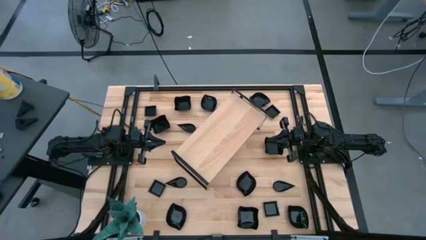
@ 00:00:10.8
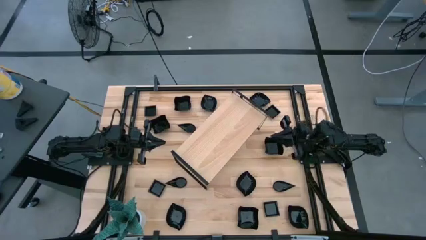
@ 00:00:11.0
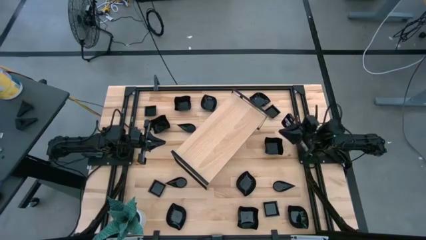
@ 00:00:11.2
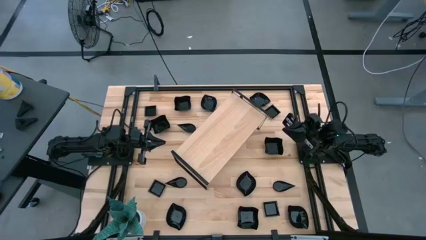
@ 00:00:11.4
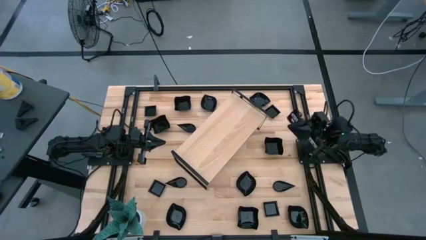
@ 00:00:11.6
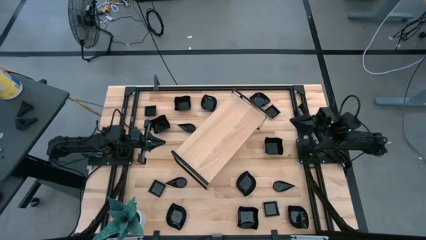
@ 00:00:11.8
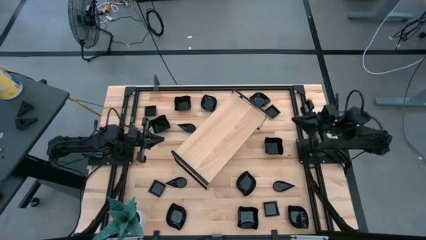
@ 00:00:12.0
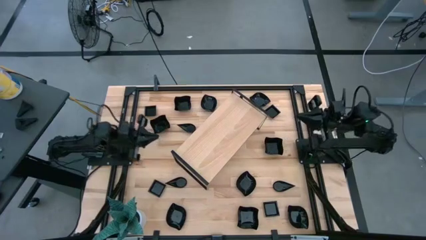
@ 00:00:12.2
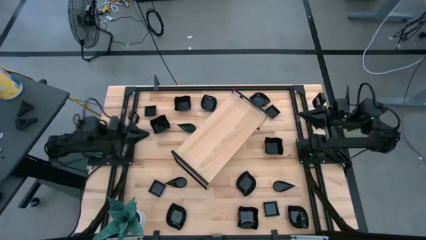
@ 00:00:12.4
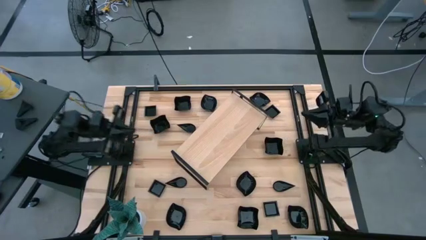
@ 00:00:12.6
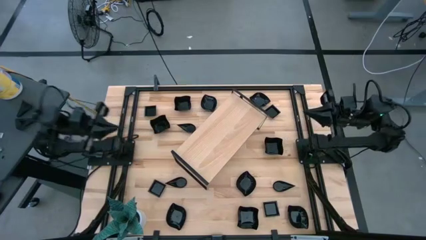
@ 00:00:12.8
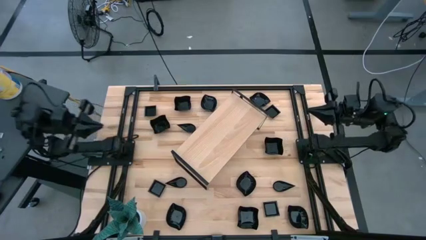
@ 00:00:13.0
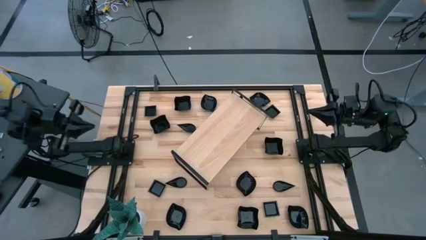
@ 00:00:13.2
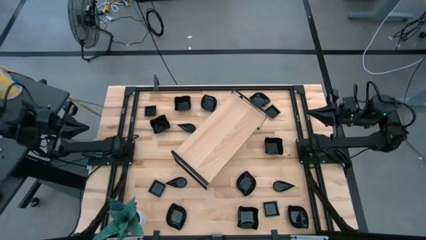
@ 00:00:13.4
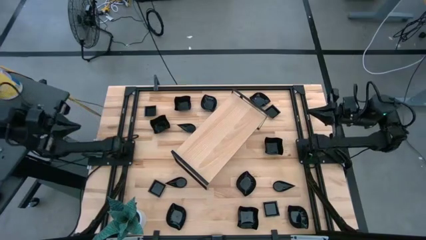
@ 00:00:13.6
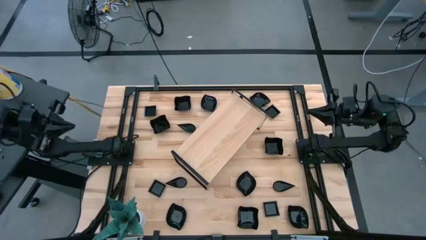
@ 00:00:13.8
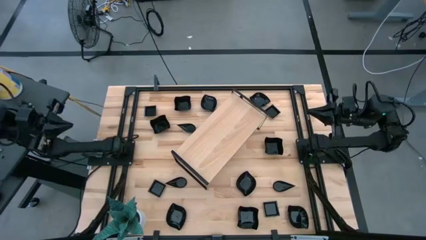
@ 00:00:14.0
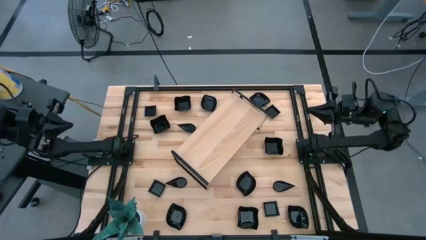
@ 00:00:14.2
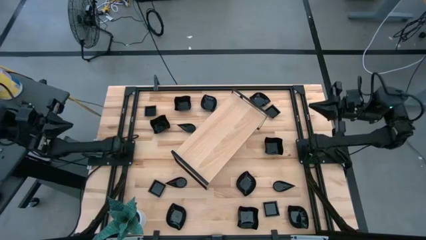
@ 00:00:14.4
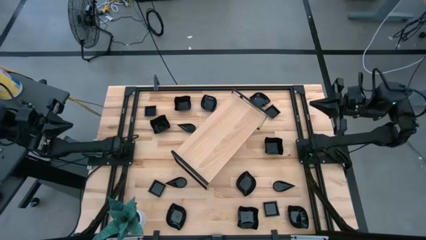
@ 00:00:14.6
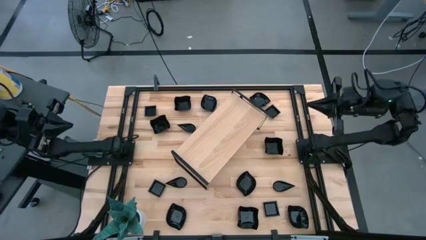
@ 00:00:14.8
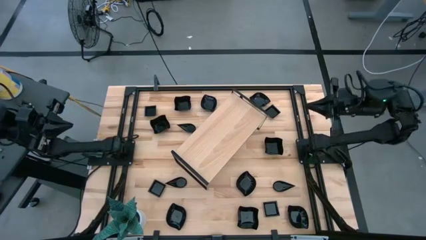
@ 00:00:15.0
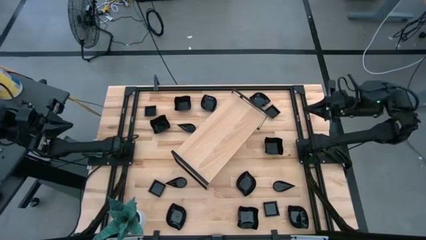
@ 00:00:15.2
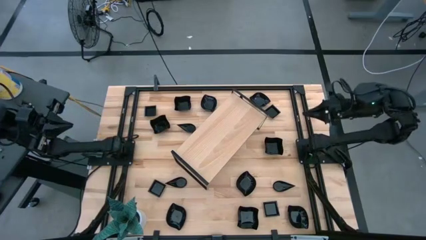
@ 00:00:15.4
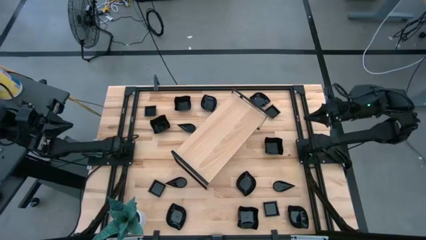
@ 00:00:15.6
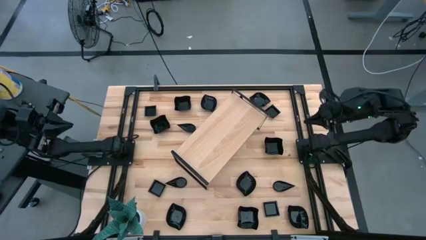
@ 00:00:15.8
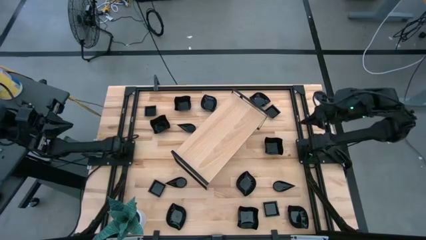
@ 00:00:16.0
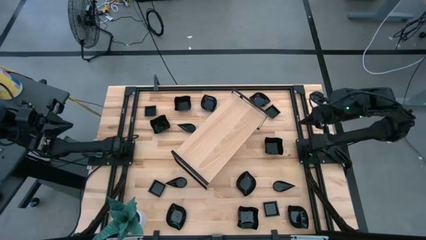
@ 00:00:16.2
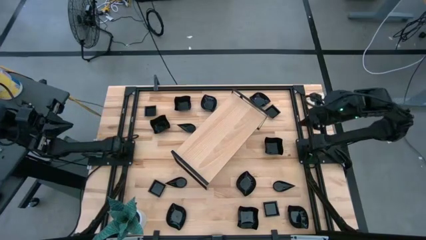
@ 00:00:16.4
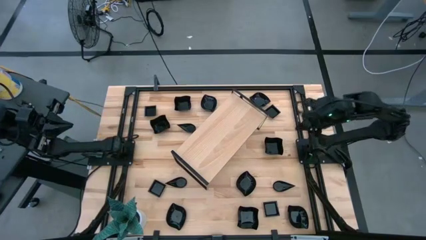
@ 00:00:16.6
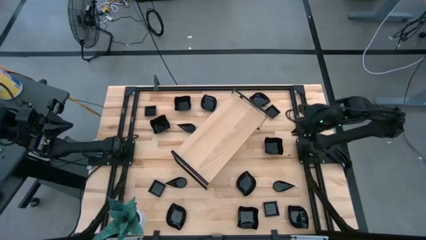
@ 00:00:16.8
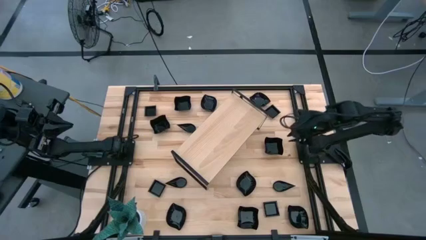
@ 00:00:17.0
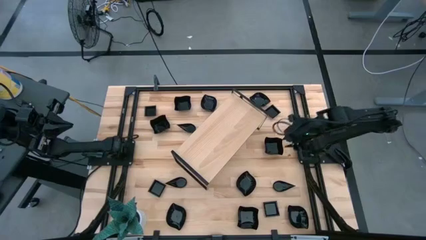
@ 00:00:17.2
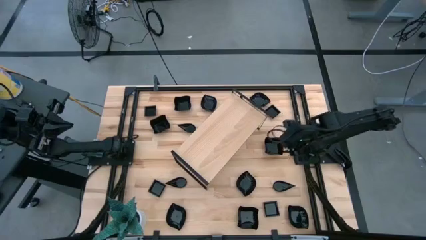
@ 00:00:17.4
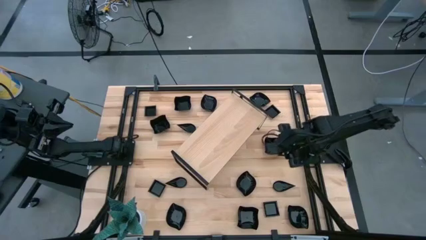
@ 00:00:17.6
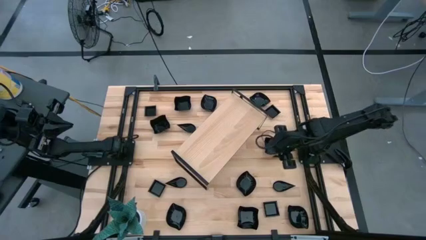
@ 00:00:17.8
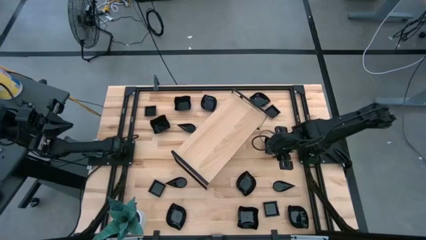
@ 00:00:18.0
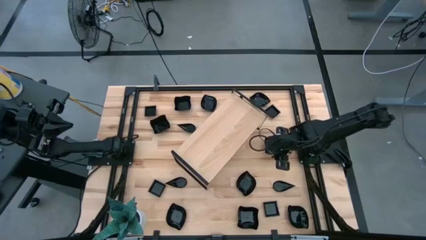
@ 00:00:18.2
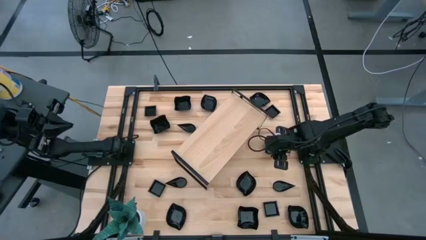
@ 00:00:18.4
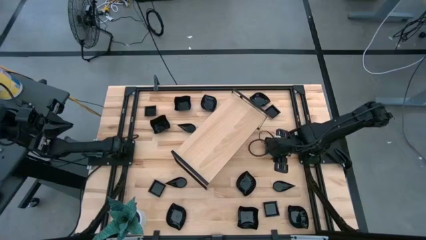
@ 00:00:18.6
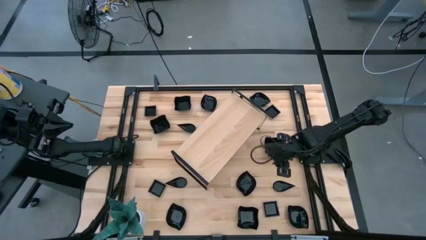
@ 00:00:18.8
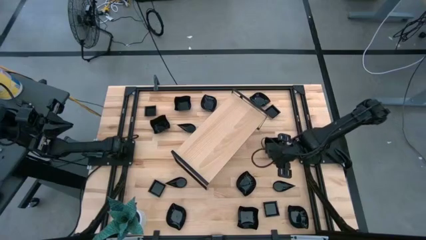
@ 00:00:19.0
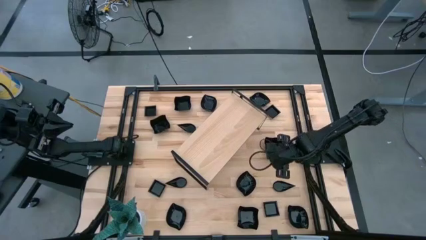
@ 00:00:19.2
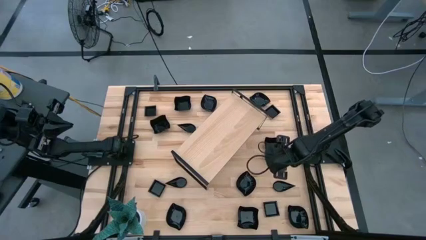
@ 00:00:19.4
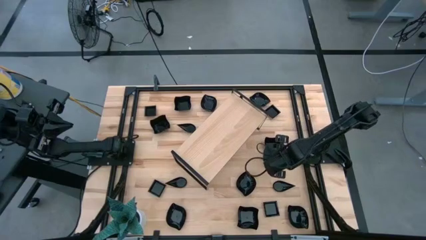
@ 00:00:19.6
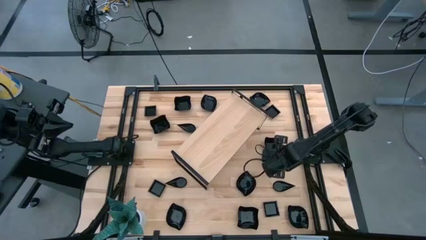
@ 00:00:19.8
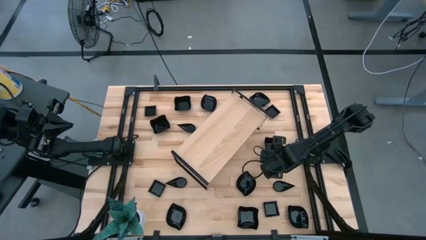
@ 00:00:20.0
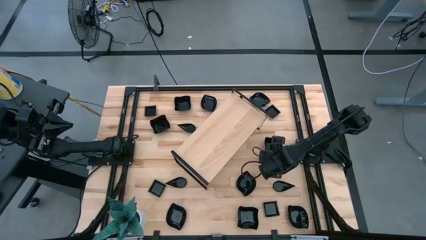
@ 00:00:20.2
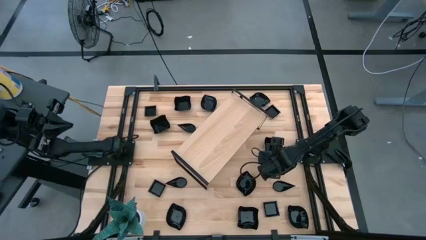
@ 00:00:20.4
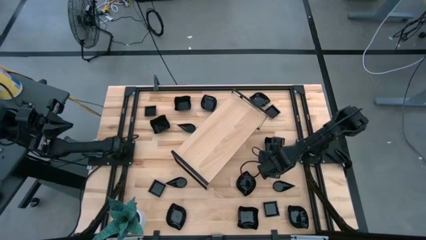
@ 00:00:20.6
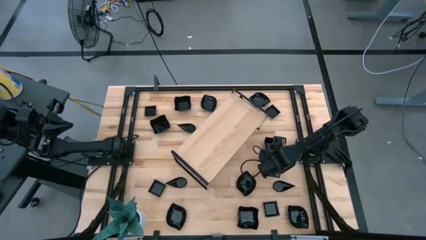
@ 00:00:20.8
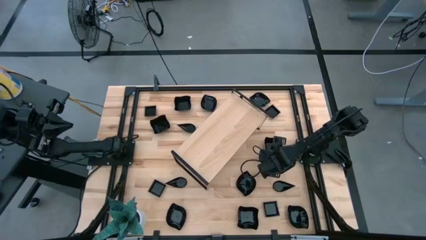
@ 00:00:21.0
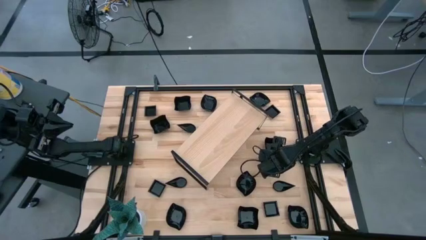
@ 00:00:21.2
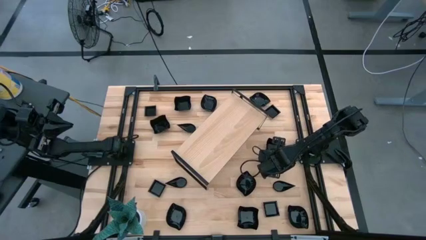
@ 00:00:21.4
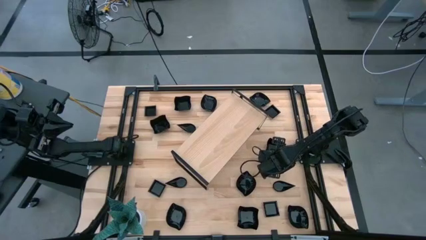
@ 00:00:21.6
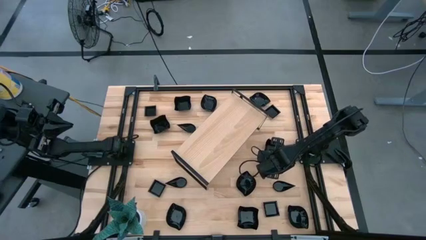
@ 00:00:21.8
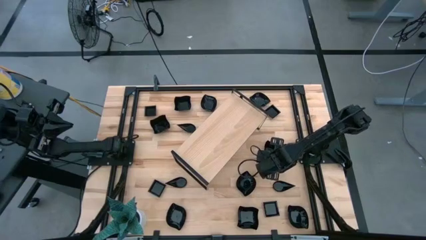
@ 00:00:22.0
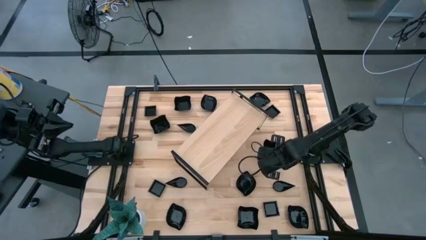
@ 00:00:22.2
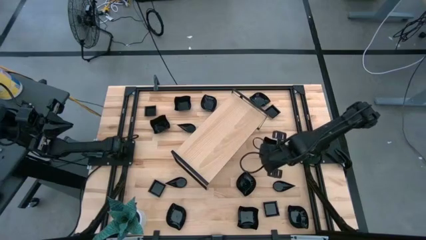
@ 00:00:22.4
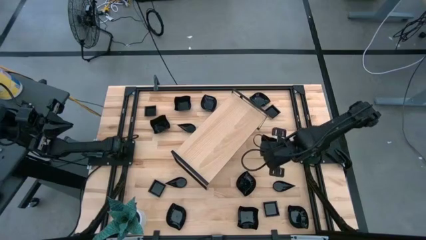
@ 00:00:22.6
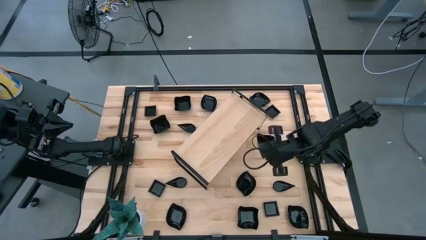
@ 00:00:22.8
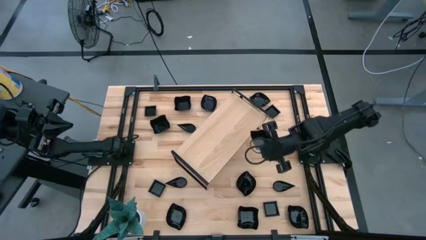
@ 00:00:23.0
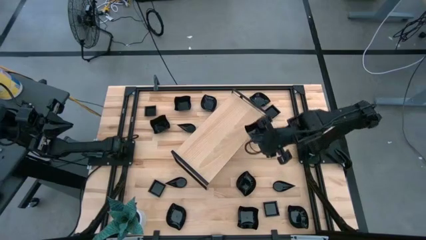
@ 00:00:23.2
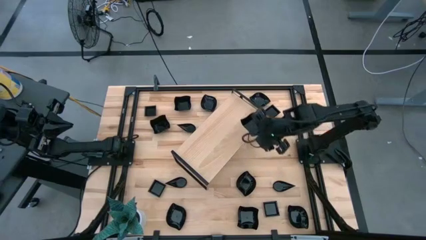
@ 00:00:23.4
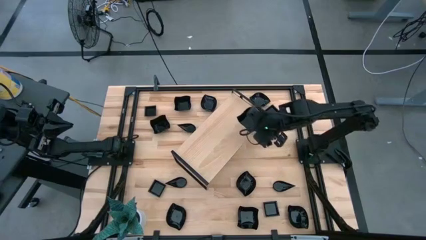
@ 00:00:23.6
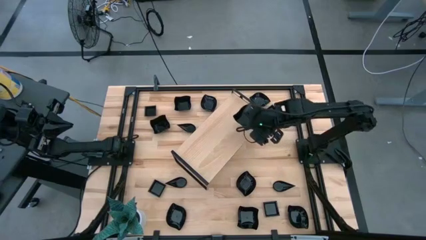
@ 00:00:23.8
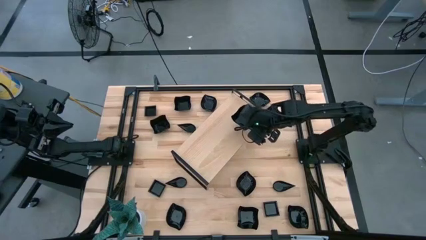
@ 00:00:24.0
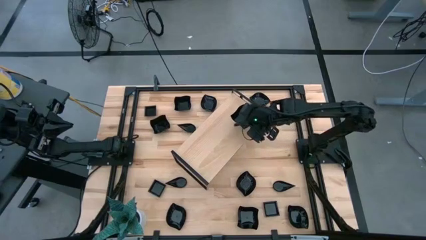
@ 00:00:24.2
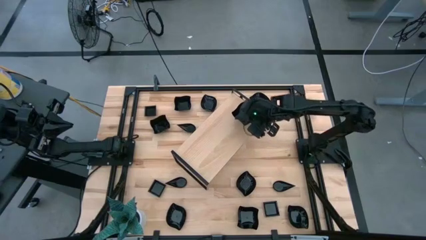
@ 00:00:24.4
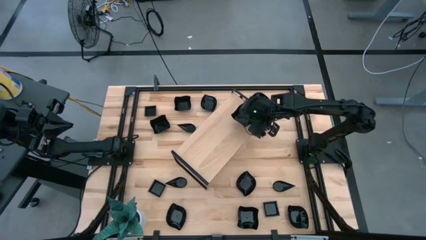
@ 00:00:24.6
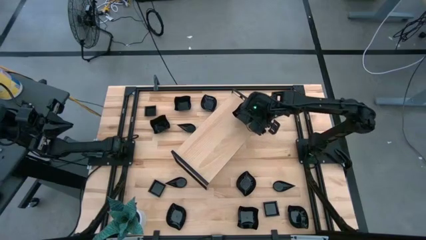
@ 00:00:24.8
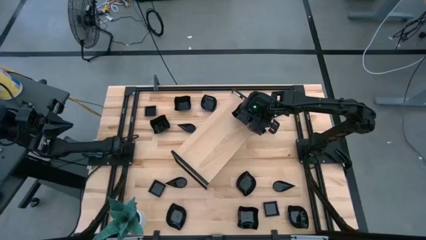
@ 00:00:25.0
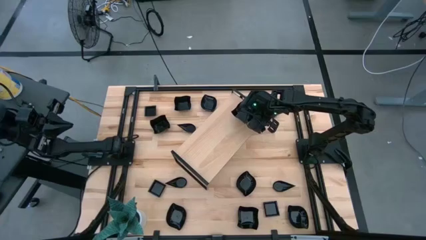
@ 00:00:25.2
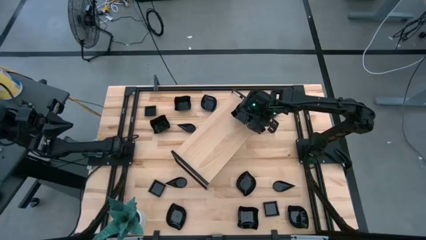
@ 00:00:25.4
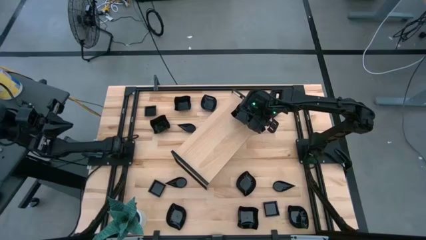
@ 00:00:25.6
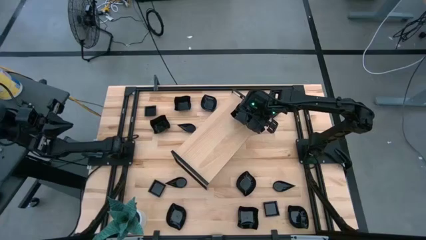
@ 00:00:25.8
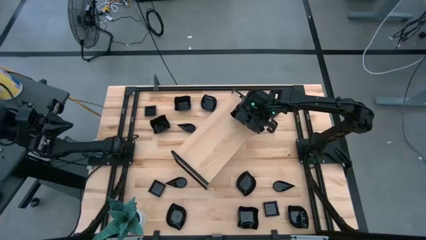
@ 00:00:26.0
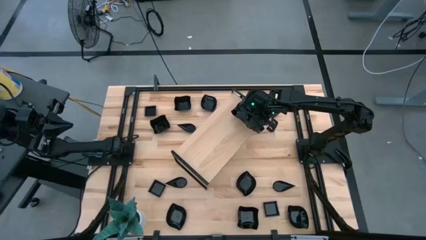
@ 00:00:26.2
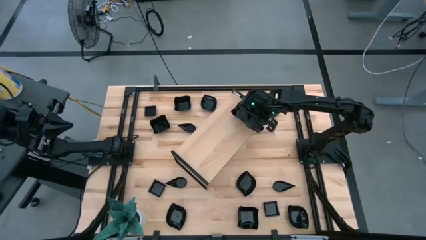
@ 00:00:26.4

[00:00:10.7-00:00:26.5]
Task: Pick & Place Mini shaped plates
Put the black wave square shaped bowl on the shelf
